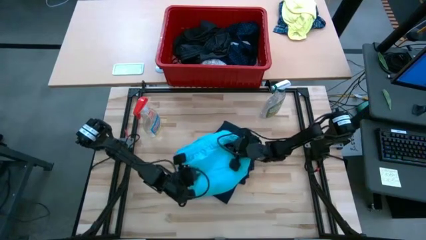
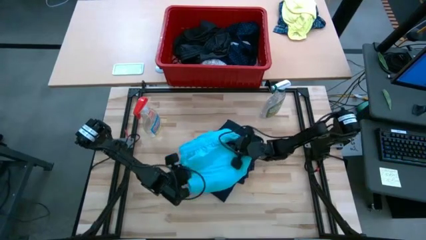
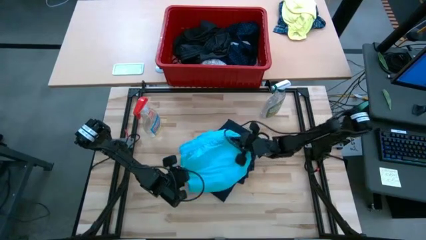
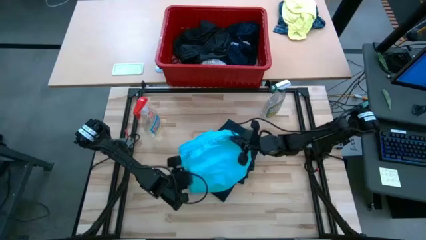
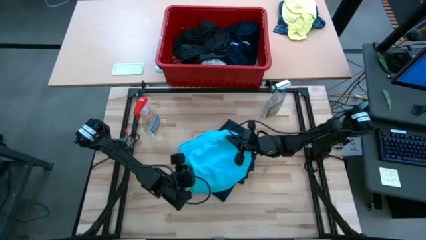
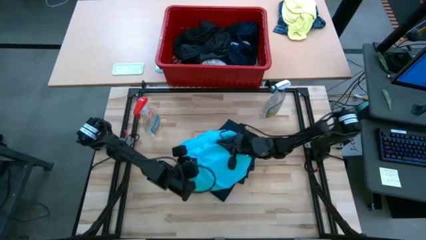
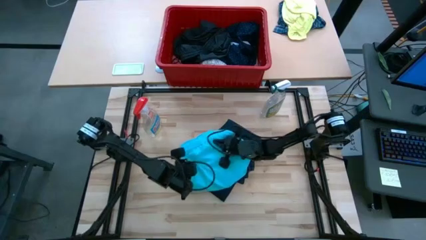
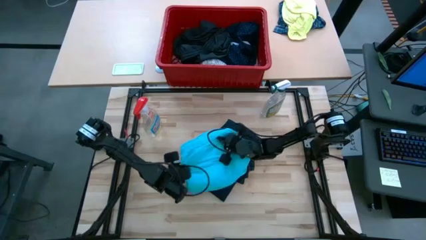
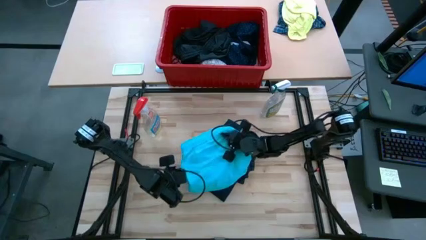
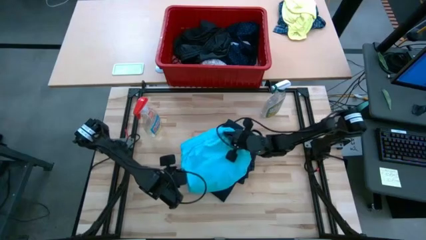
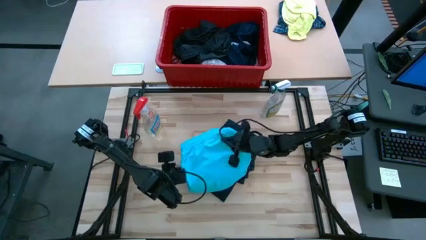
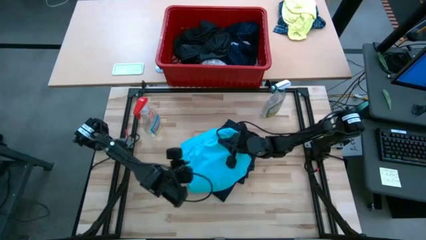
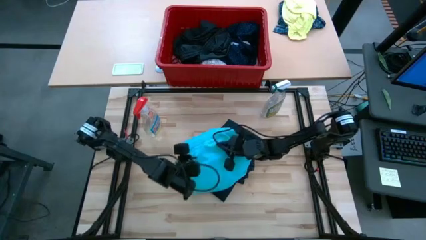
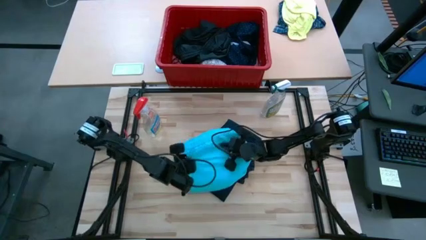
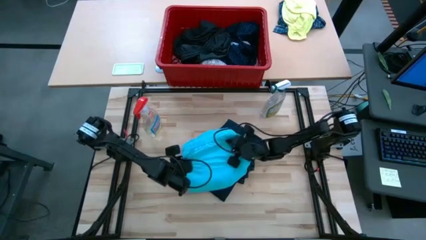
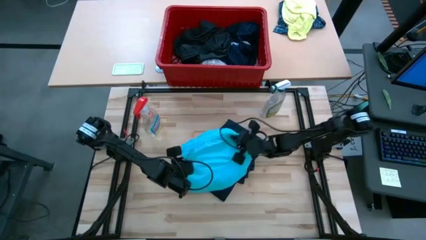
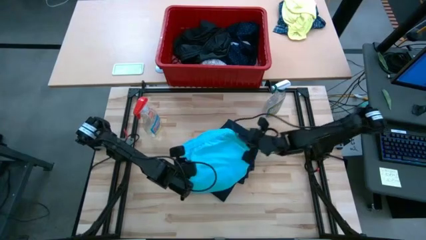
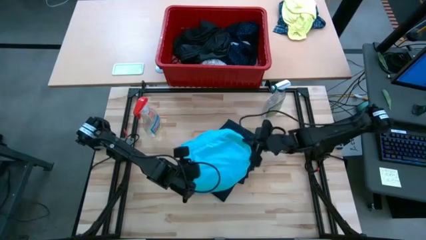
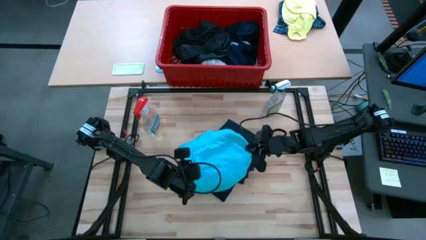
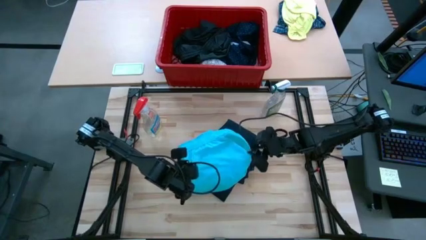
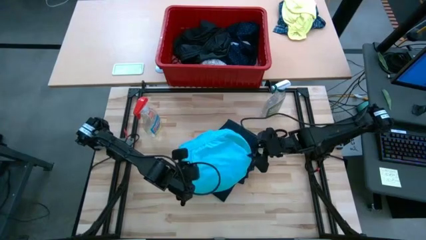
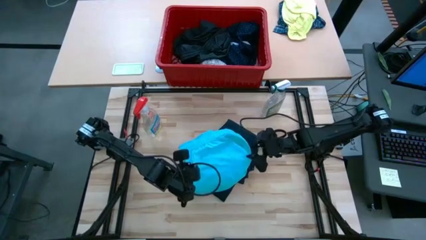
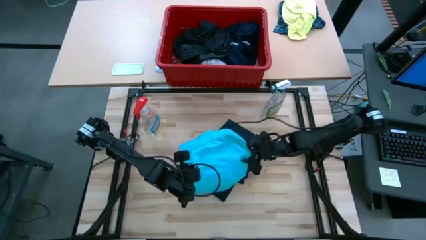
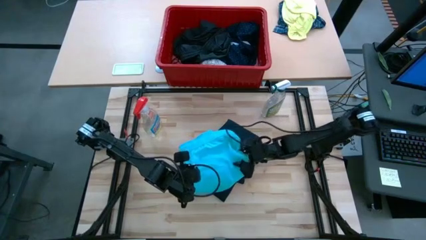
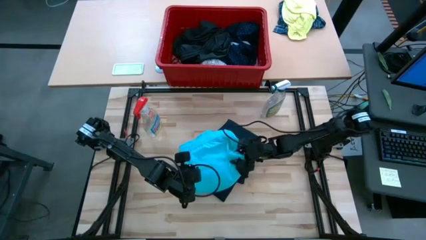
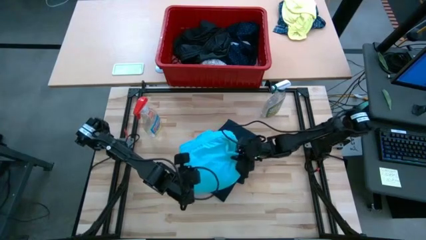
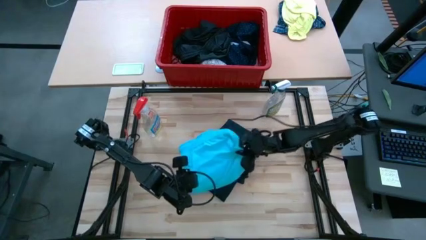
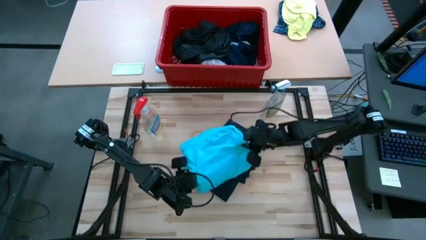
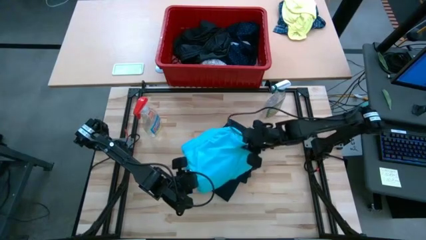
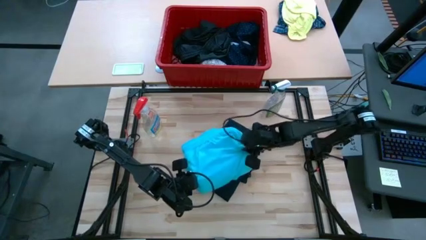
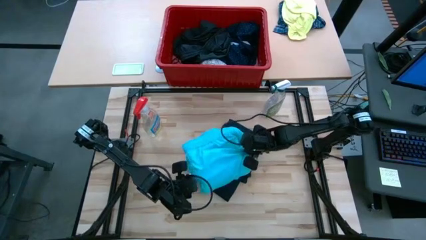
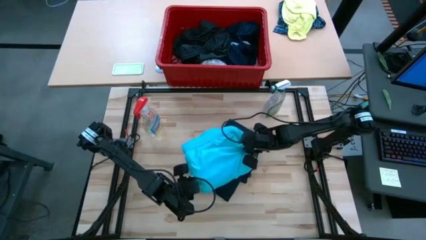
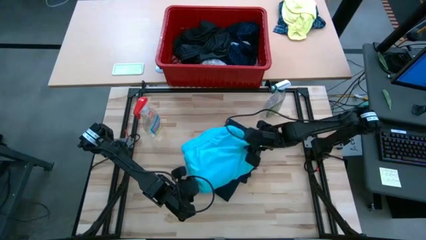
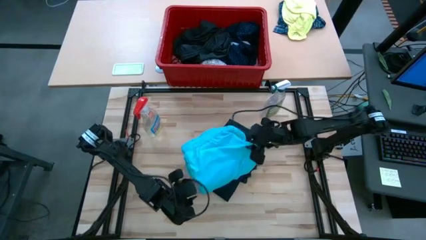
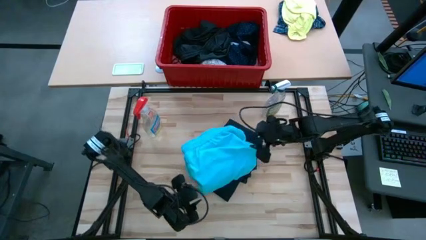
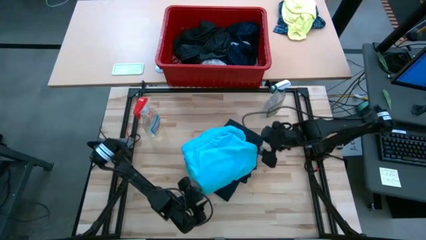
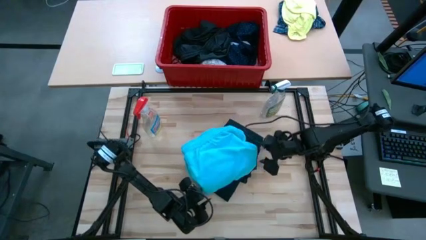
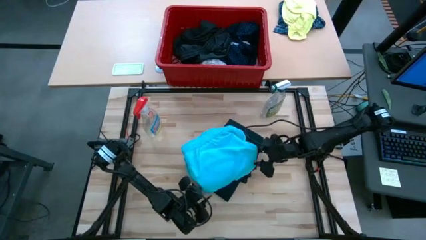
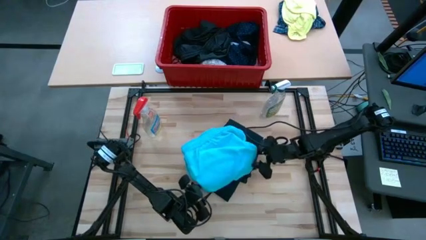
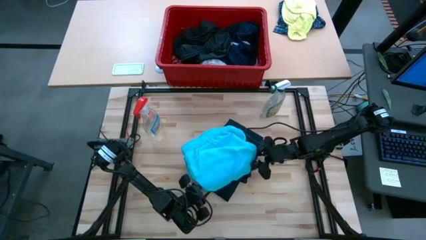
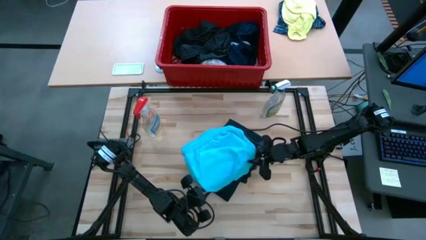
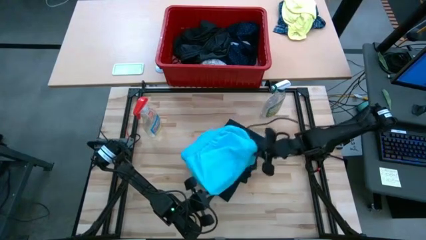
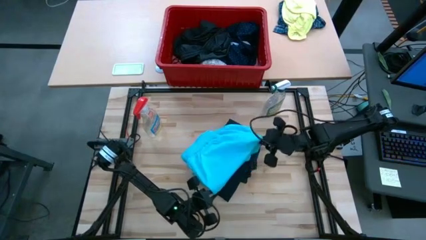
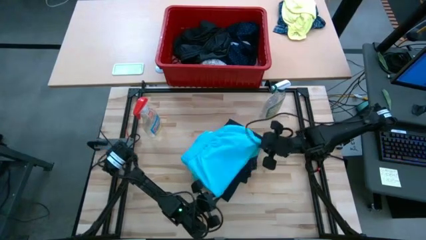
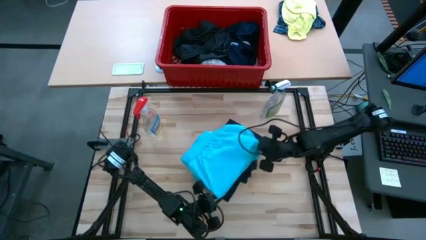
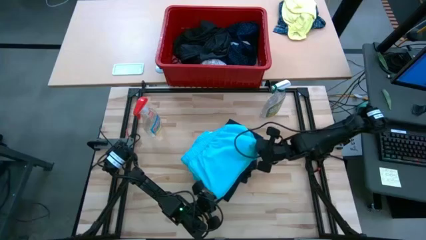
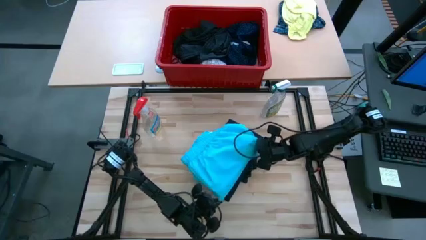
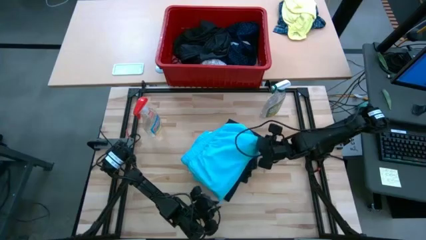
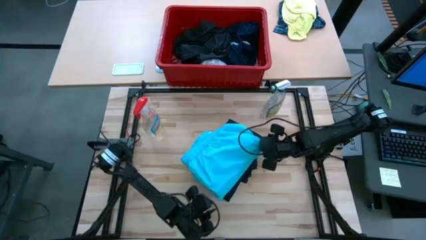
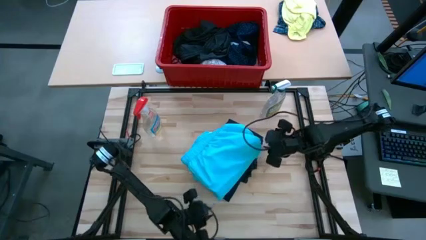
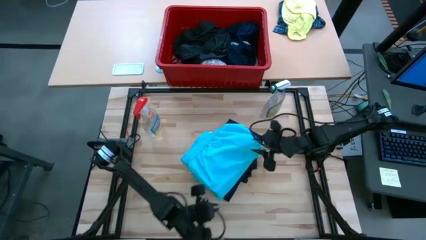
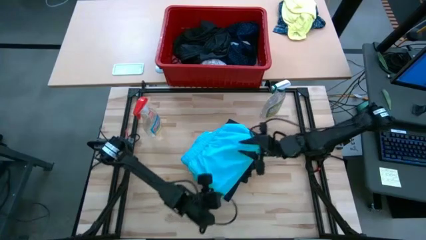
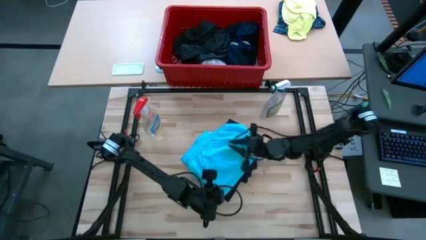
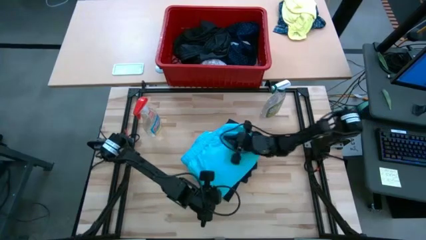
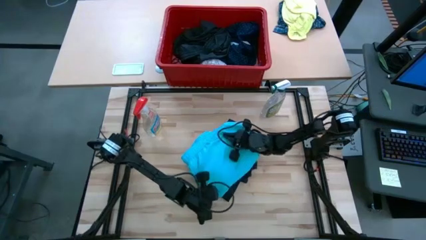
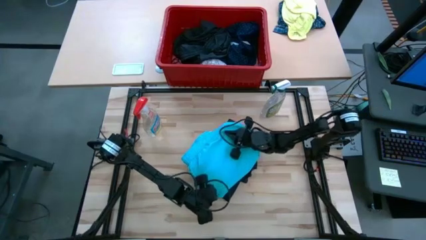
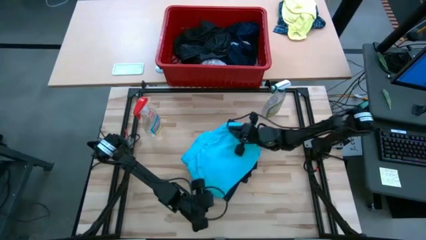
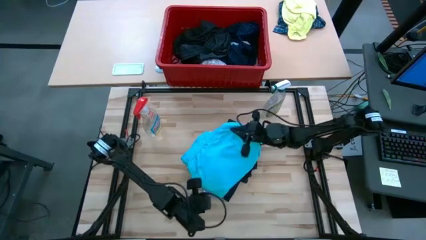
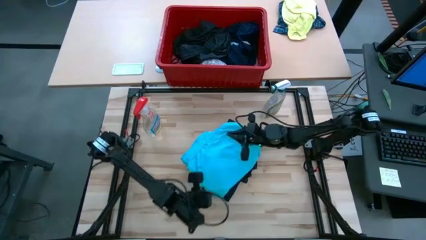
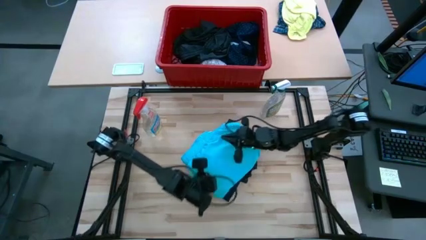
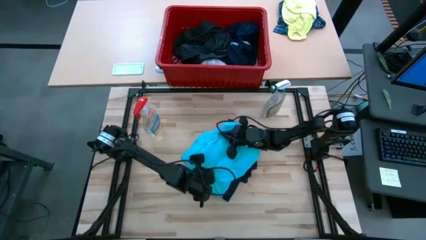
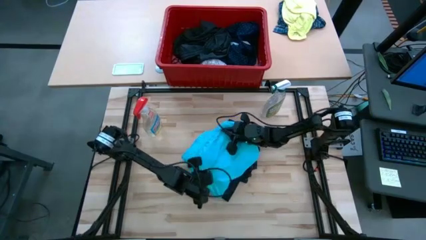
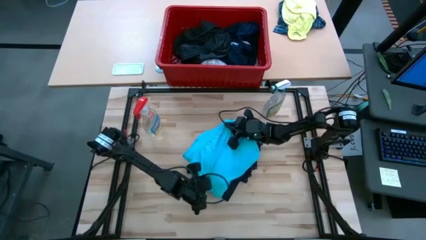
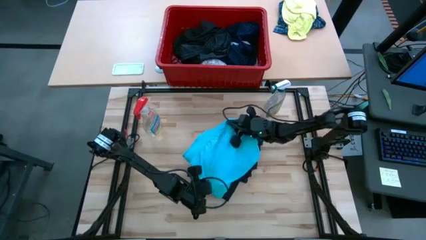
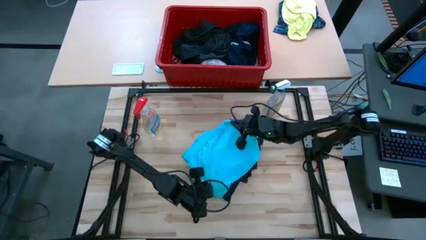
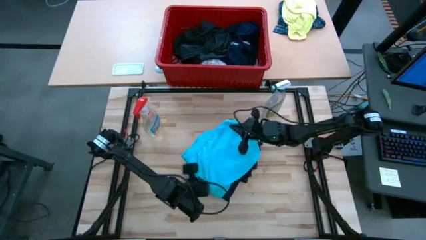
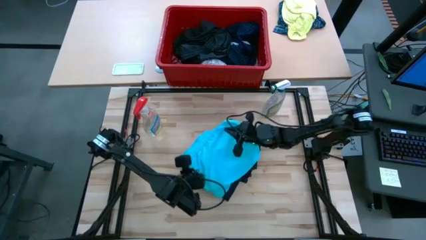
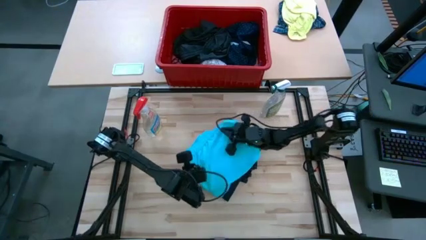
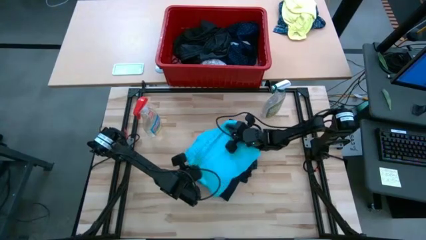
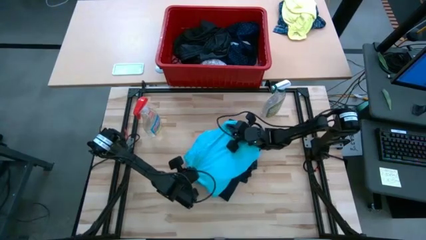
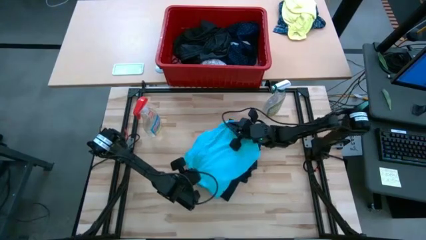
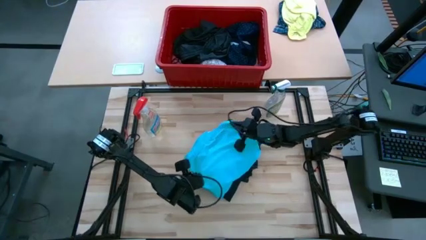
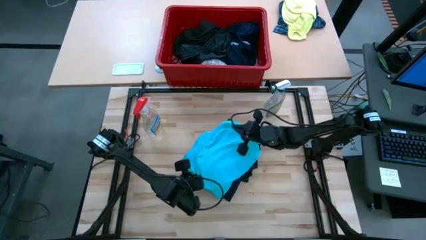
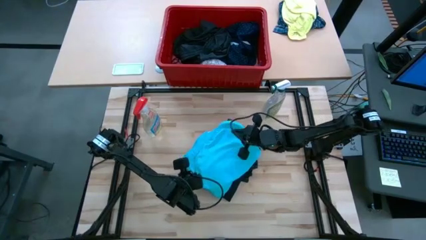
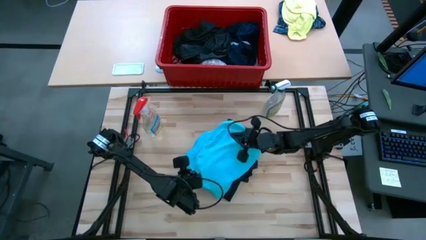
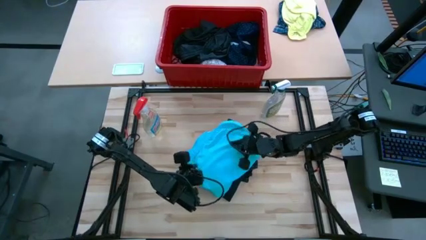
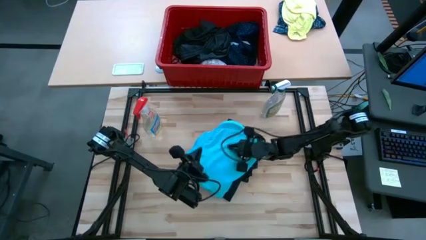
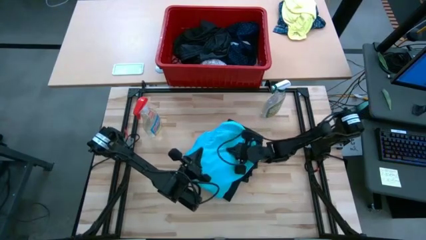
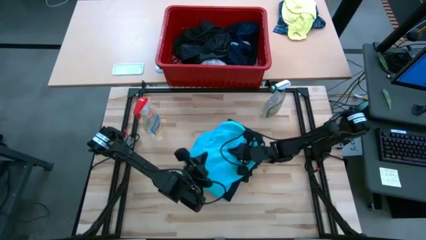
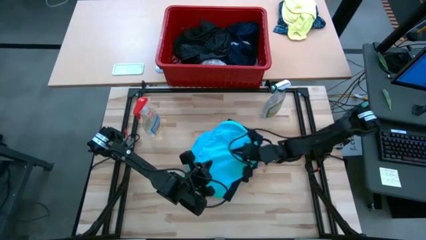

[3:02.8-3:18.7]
Task: Fold Laundry from Bin
Fold the light blue shorts
